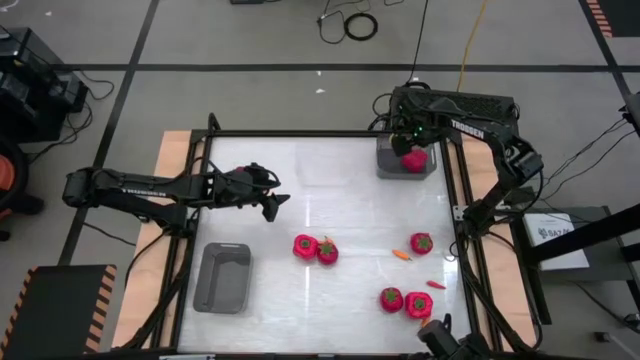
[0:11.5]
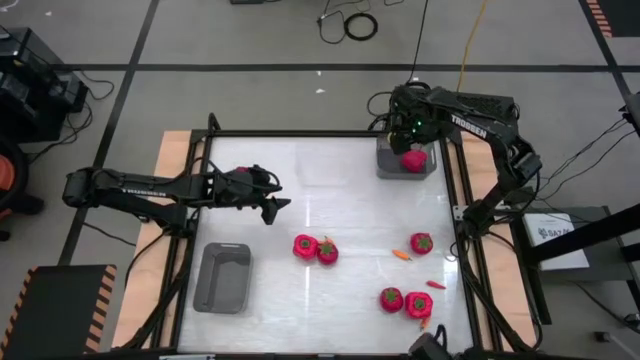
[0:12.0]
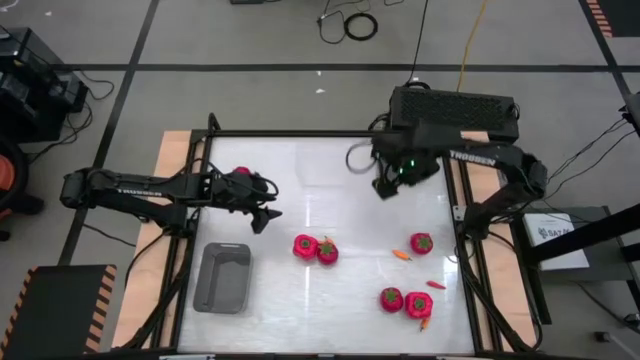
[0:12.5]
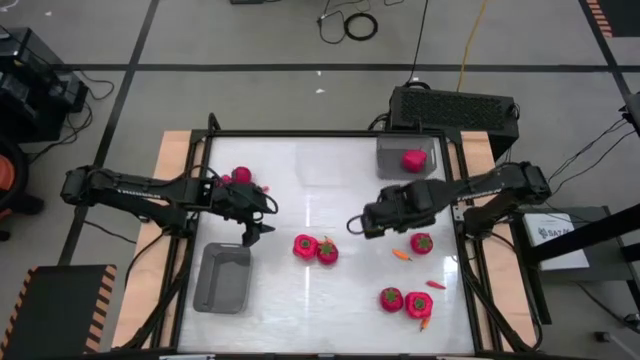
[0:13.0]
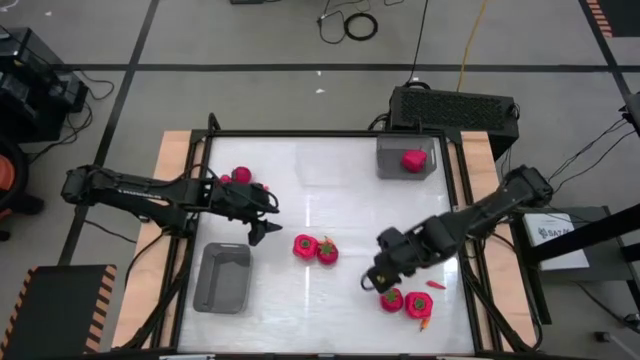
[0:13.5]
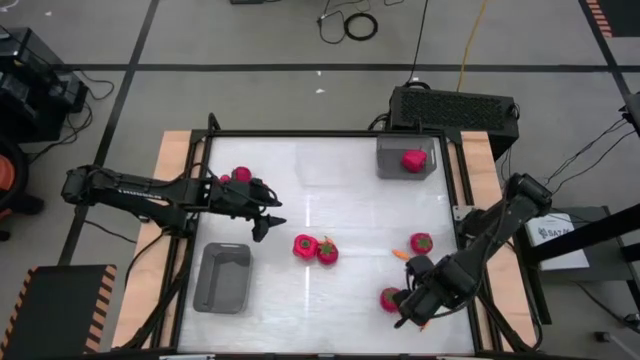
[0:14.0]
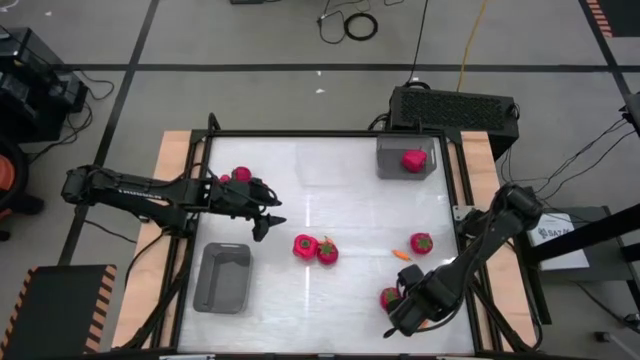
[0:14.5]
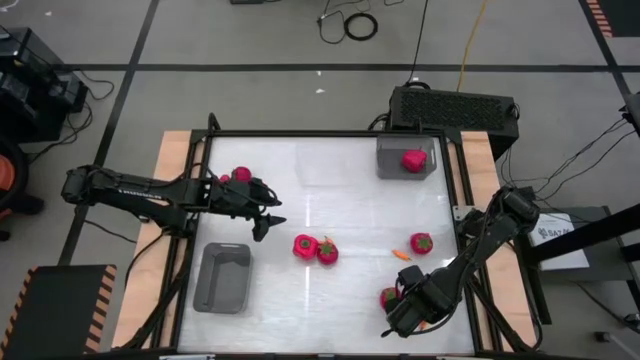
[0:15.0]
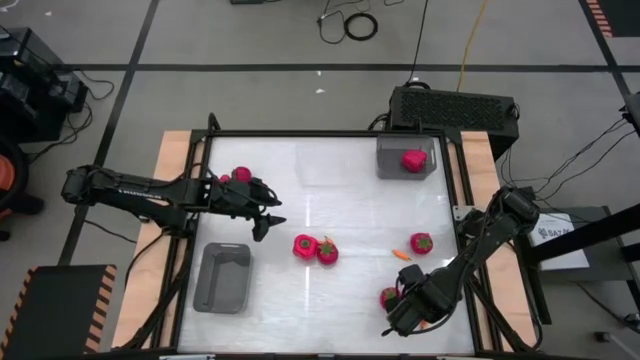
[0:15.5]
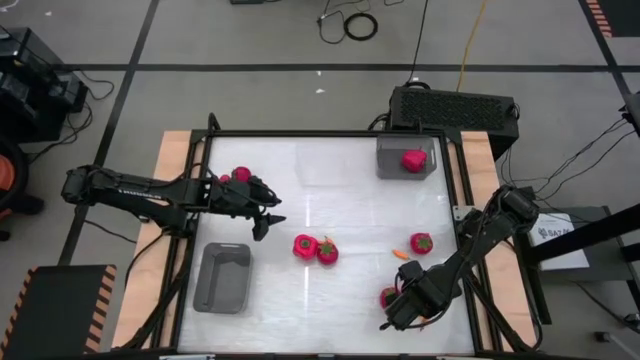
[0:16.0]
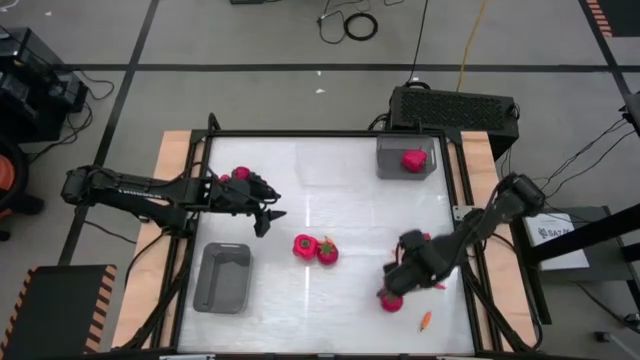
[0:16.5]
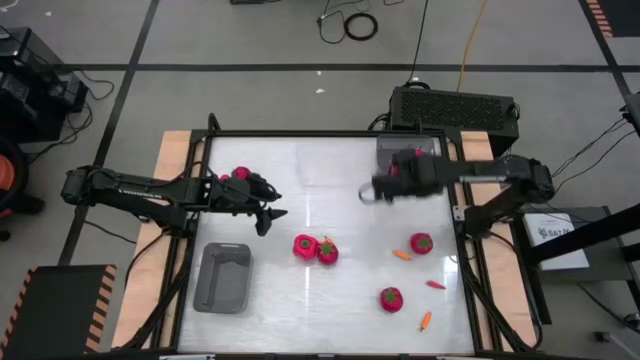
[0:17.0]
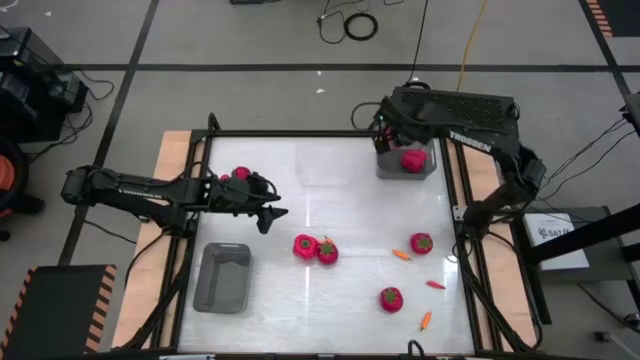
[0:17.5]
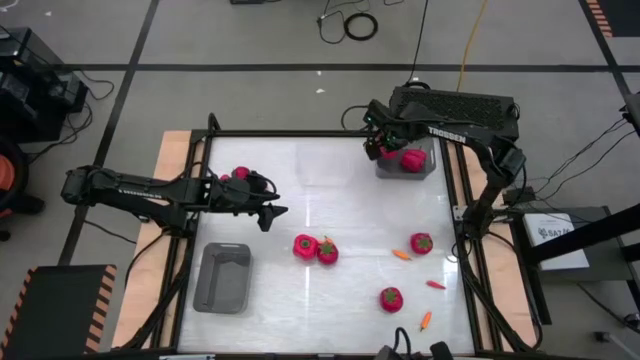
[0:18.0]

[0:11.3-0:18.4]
Task: Sort produce into baskets
Put the red bell pepper into the top gray bin

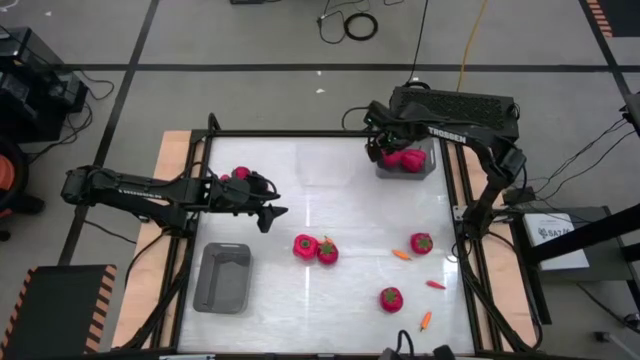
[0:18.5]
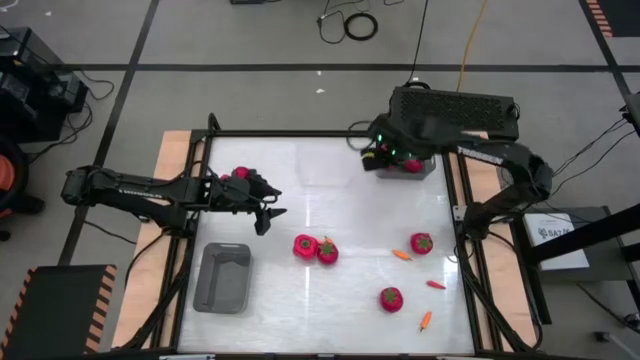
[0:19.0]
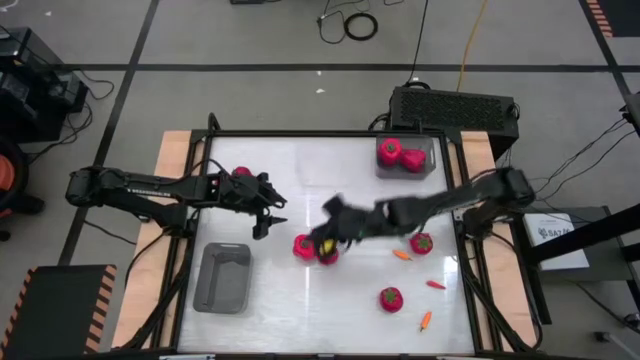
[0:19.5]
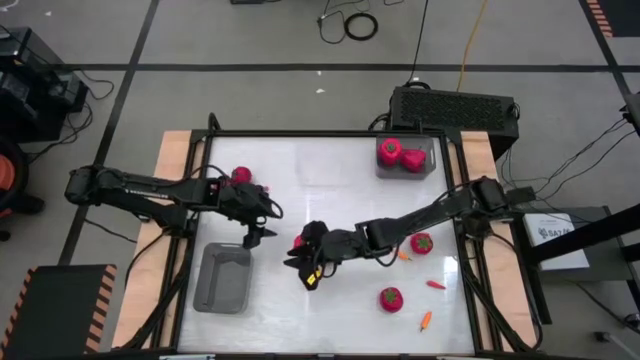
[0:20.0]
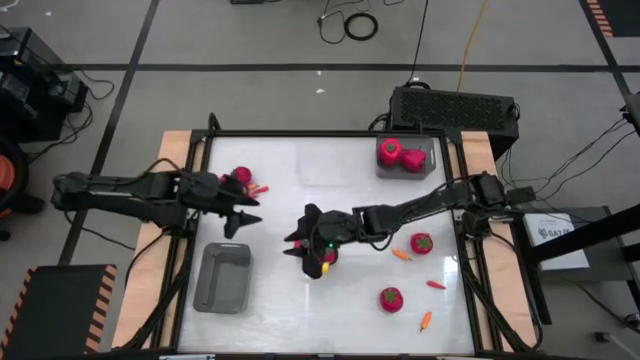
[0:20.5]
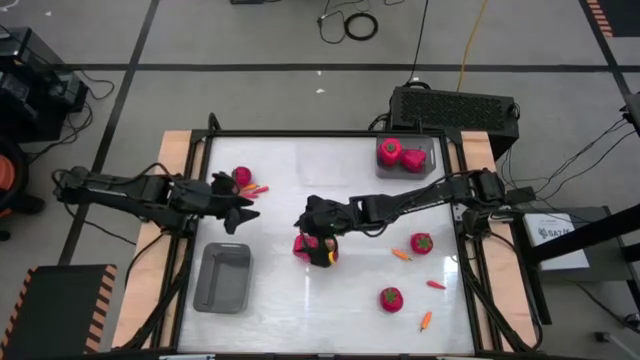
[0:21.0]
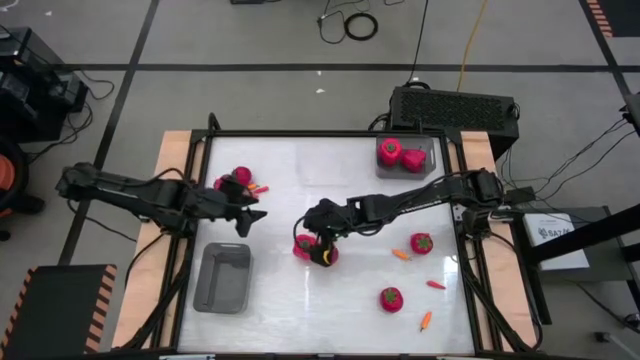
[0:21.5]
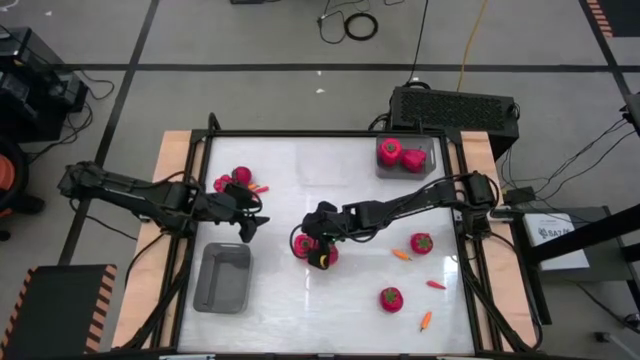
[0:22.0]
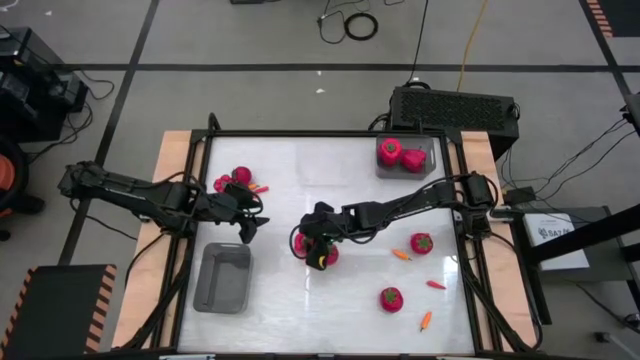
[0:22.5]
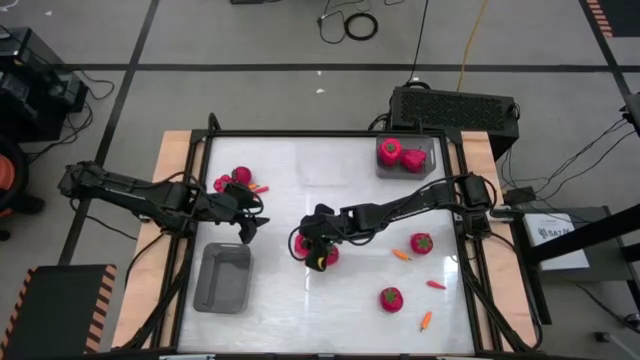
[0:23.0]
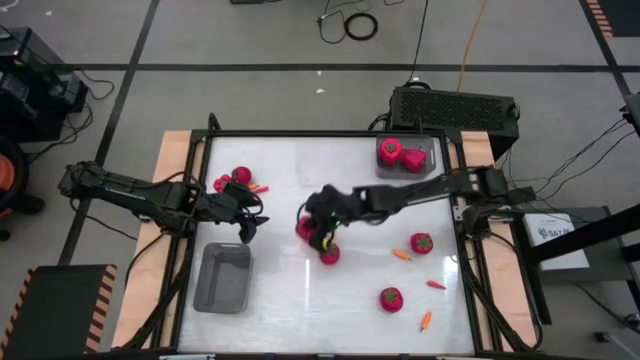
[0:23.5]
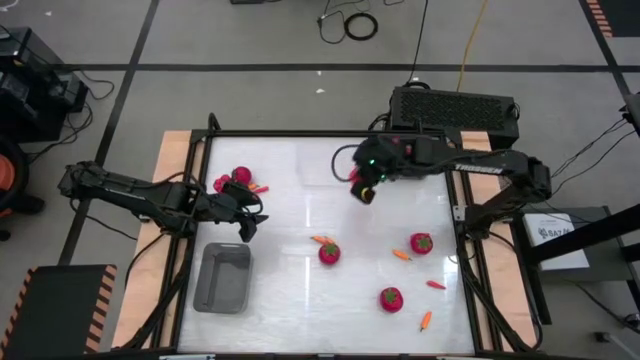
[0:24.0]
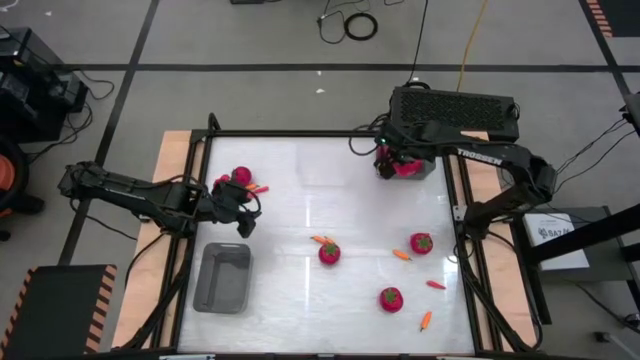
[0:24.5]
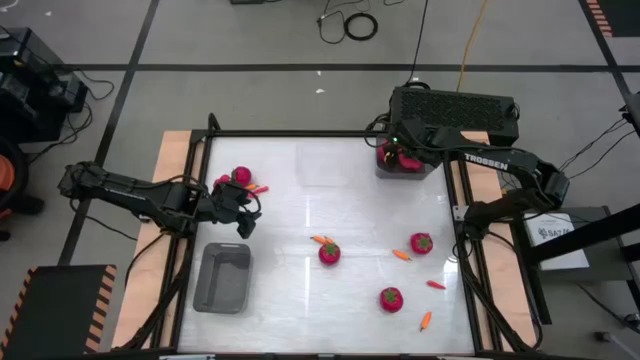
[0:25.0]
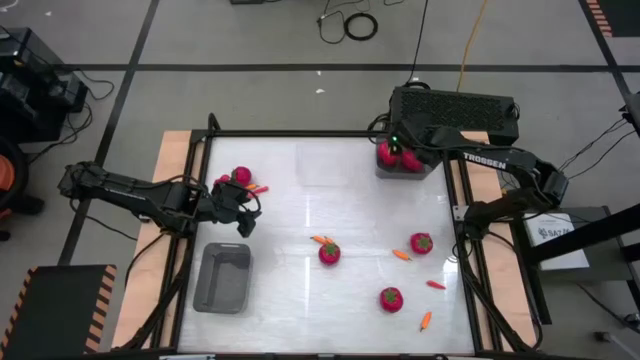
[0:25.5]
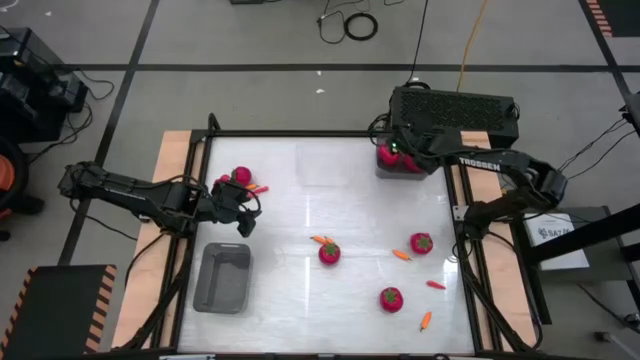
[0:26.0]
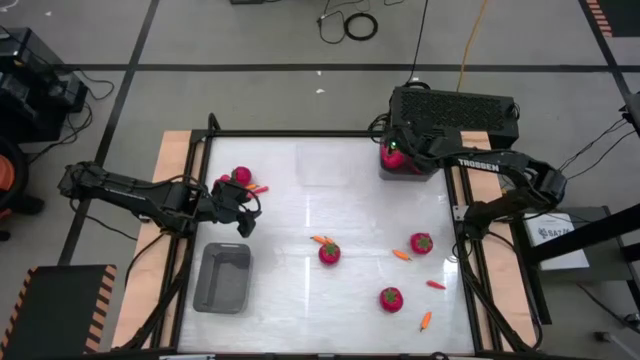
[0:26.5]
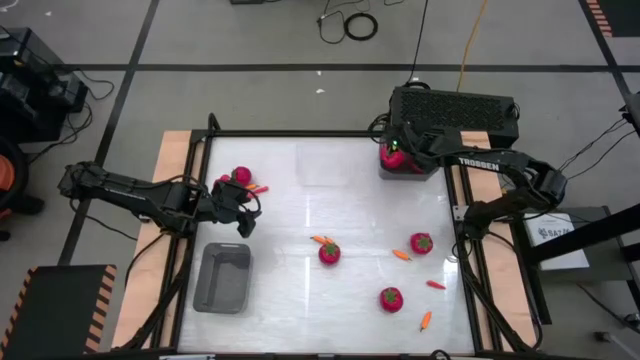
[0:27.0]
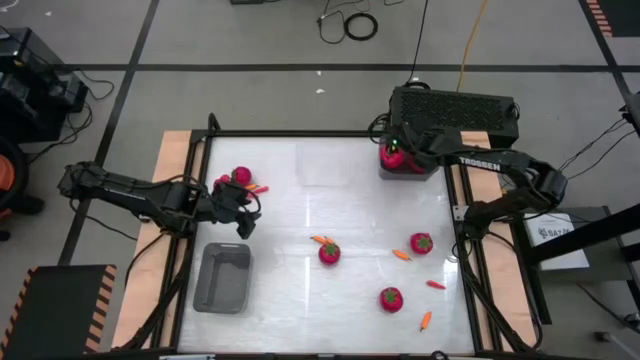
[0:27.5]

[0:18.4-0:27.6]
Put the red bell pepper into the top gray bin

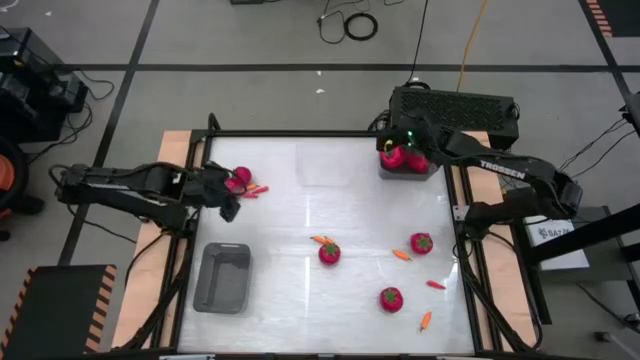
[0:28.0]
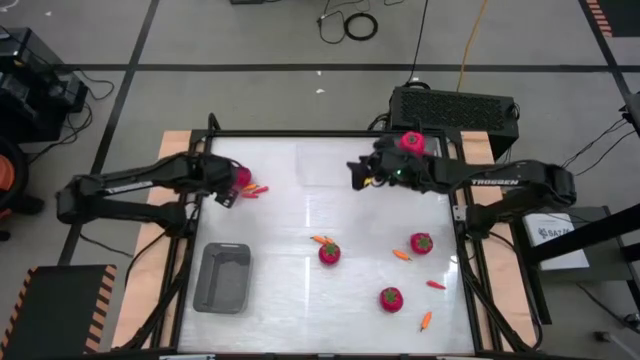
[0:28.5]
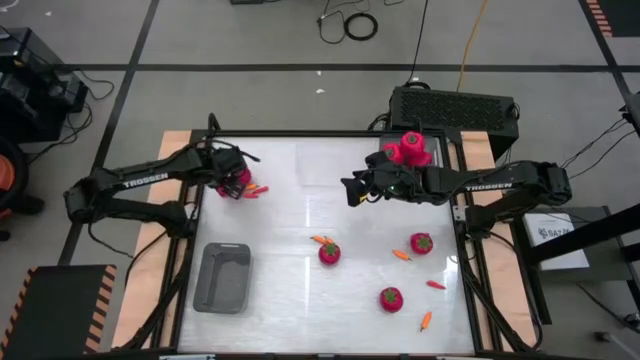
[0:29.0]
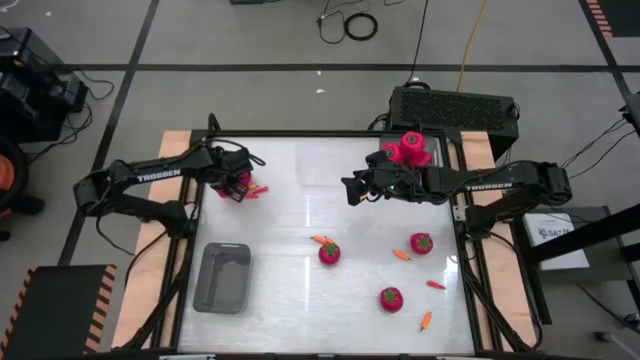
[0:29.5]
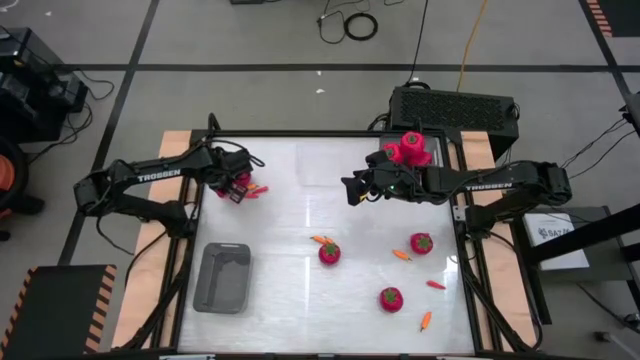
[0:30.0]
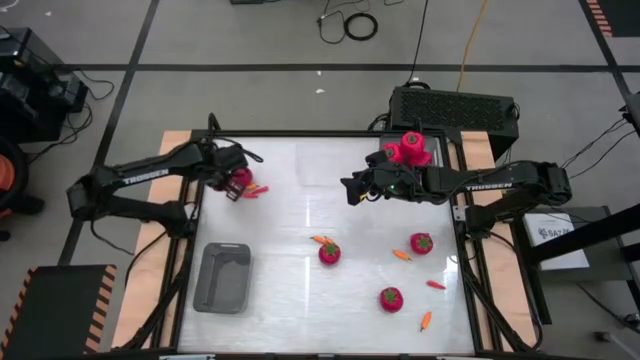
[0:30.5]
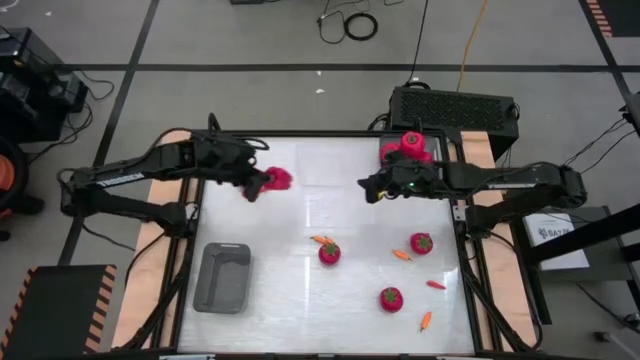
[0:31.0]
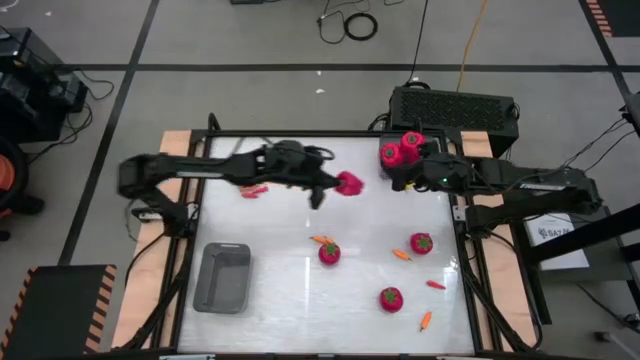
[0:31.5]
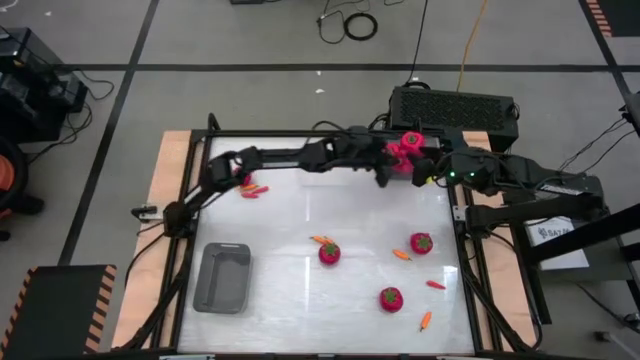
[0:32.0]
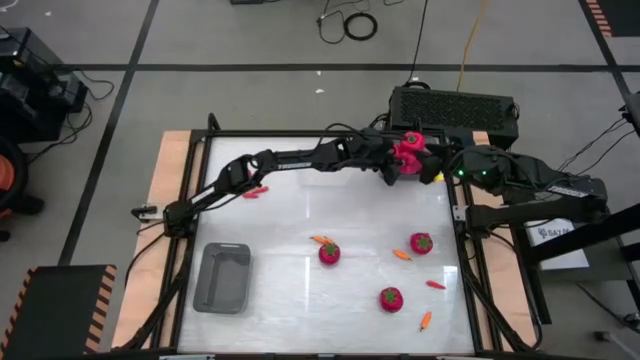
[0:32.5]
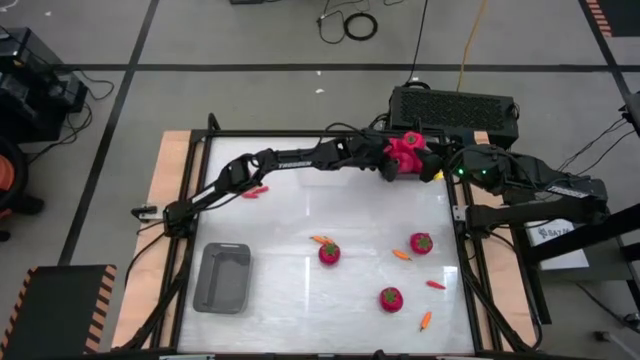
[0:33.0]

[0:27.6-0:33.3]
Put the red bell pepper into the top gray bin
